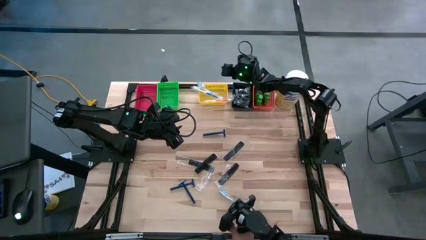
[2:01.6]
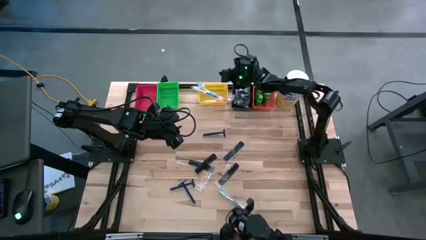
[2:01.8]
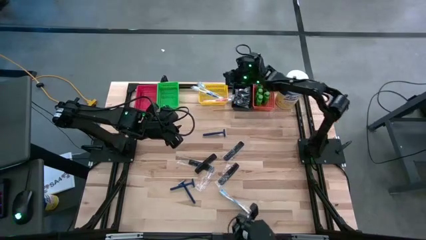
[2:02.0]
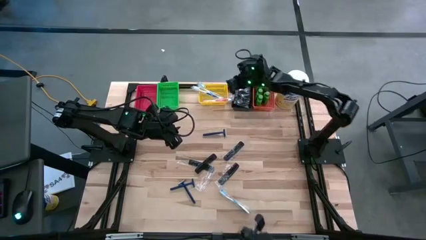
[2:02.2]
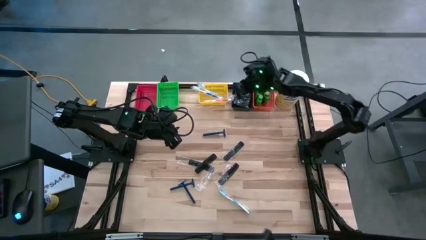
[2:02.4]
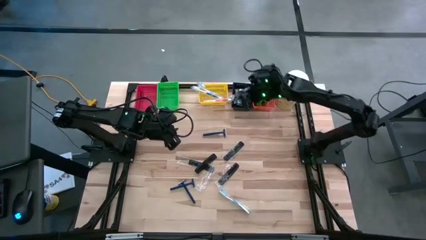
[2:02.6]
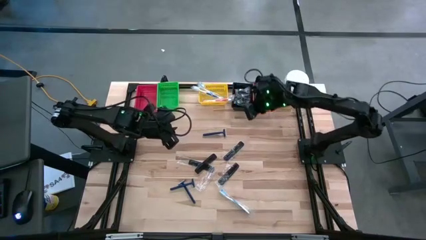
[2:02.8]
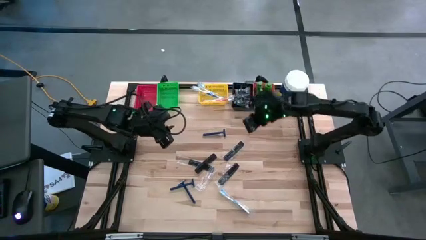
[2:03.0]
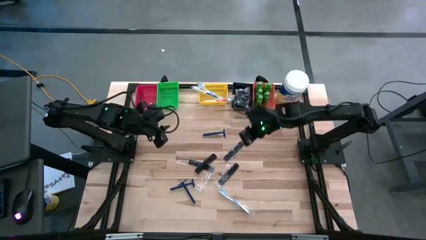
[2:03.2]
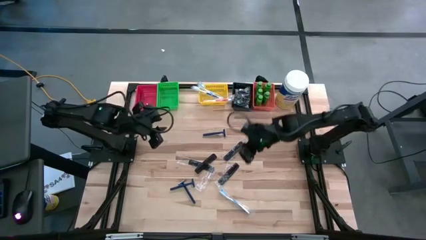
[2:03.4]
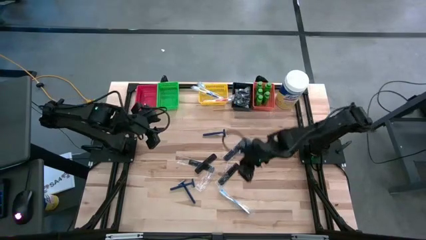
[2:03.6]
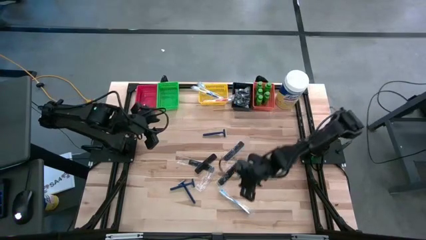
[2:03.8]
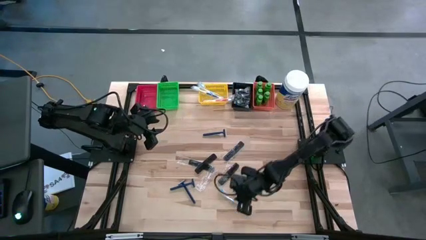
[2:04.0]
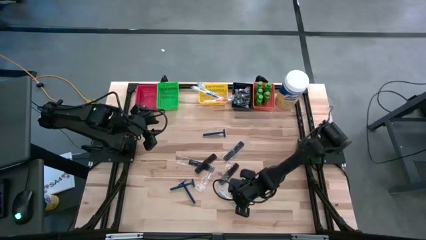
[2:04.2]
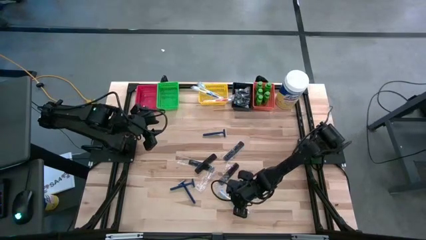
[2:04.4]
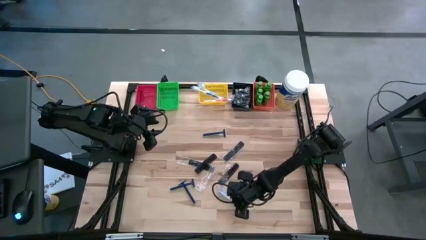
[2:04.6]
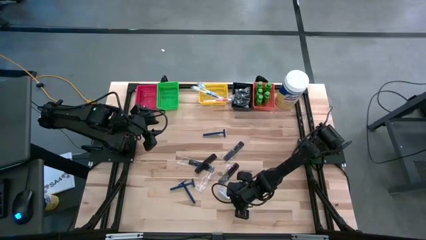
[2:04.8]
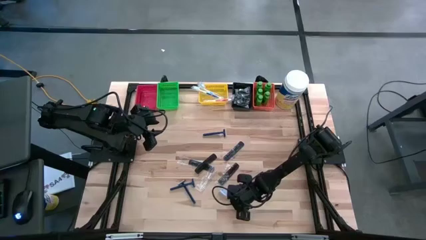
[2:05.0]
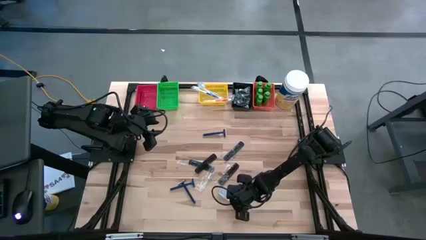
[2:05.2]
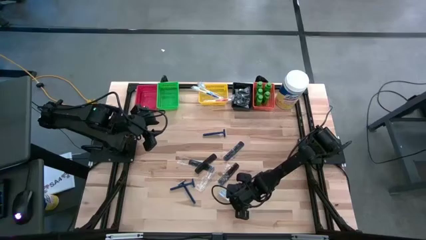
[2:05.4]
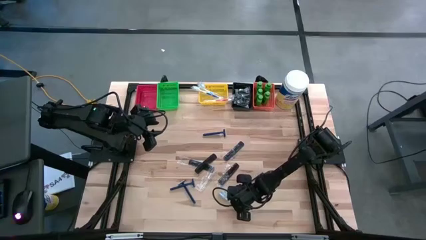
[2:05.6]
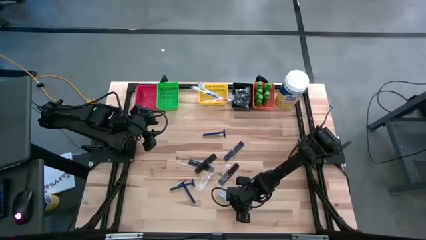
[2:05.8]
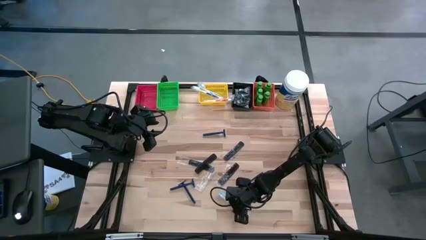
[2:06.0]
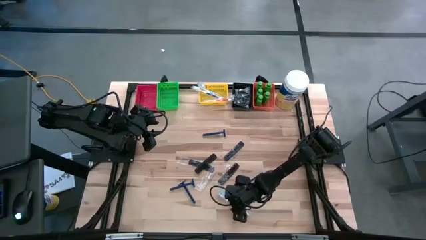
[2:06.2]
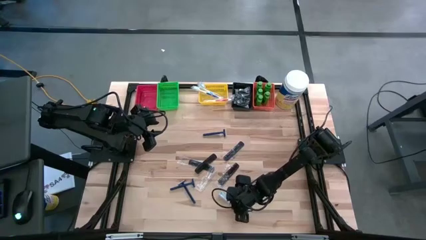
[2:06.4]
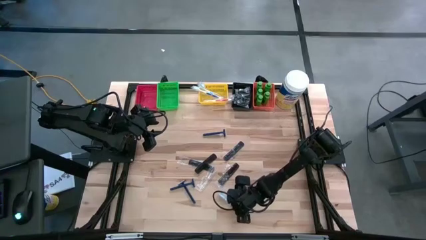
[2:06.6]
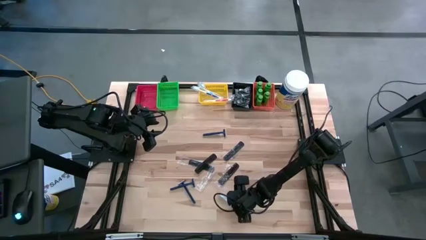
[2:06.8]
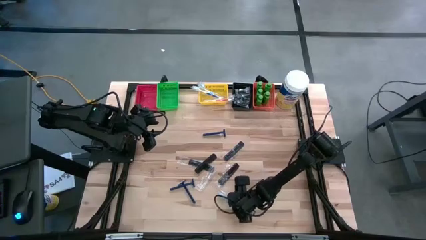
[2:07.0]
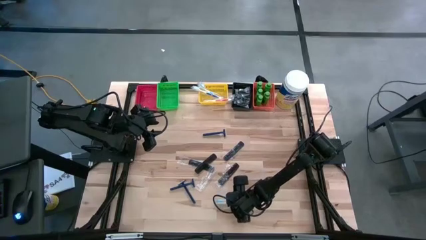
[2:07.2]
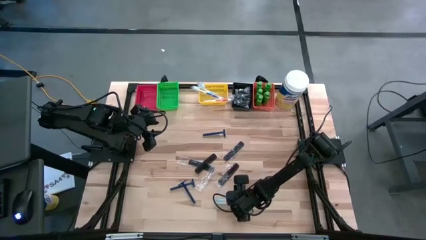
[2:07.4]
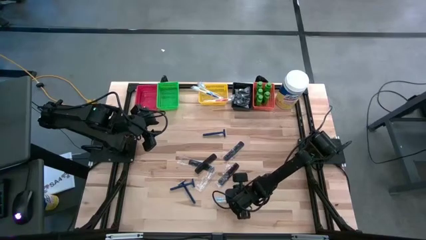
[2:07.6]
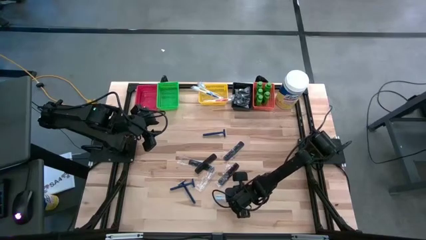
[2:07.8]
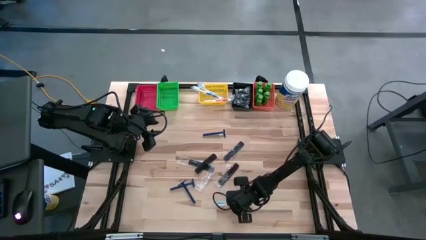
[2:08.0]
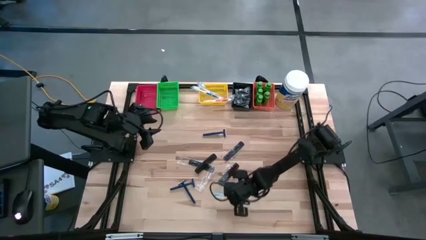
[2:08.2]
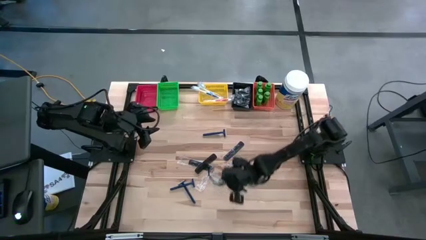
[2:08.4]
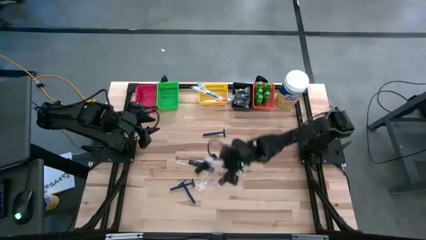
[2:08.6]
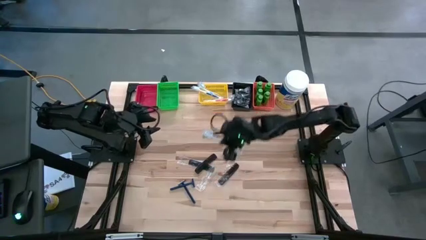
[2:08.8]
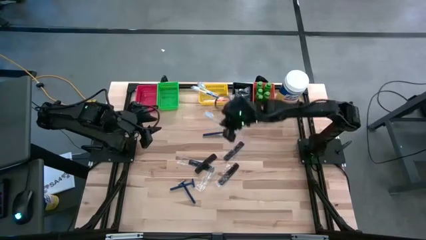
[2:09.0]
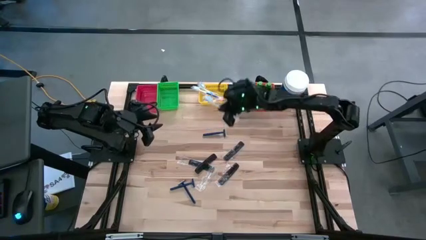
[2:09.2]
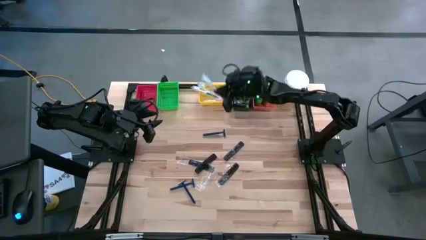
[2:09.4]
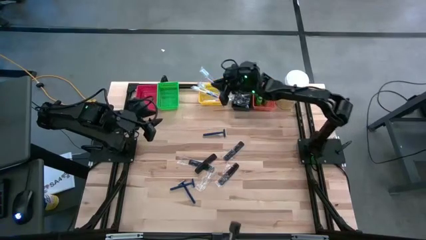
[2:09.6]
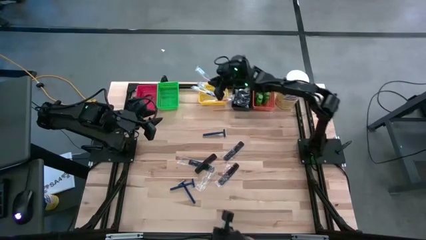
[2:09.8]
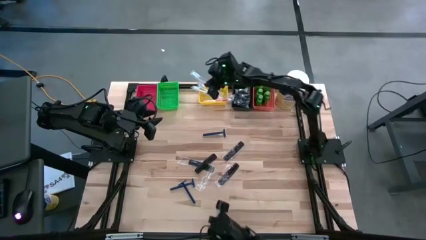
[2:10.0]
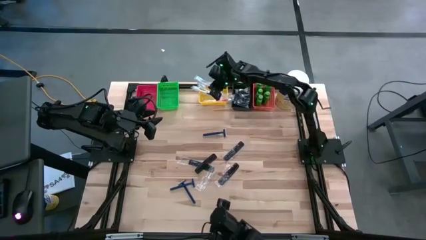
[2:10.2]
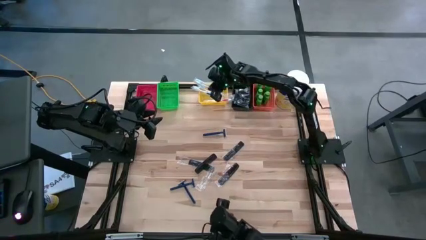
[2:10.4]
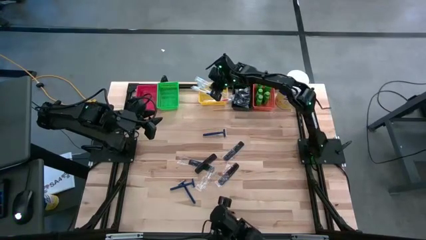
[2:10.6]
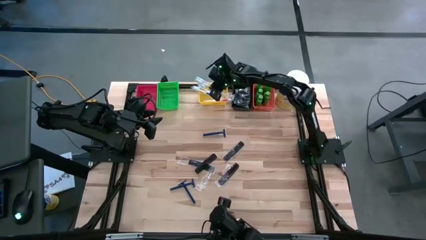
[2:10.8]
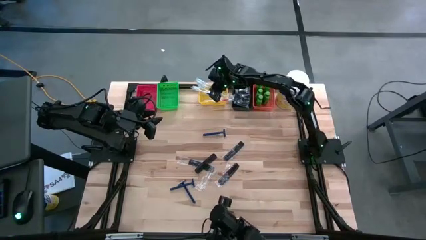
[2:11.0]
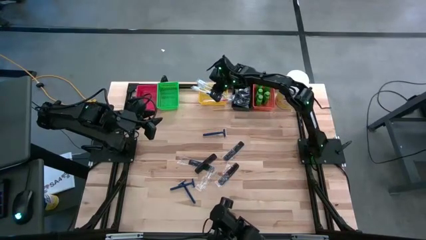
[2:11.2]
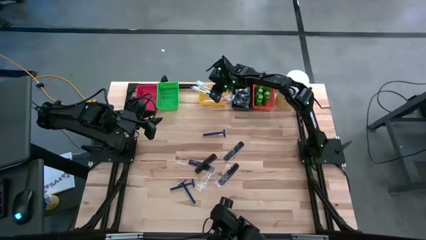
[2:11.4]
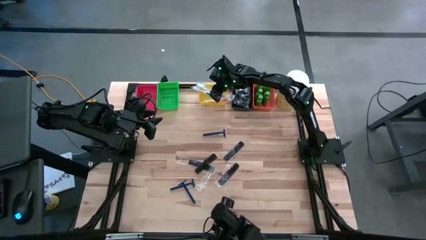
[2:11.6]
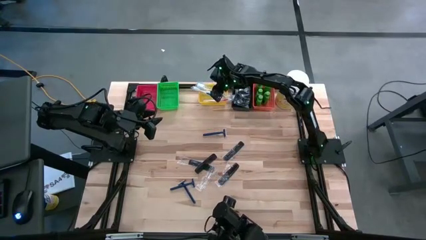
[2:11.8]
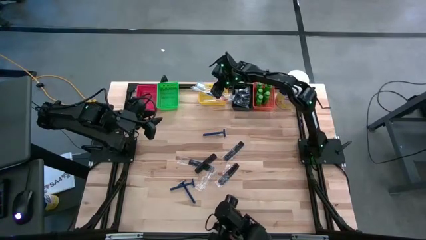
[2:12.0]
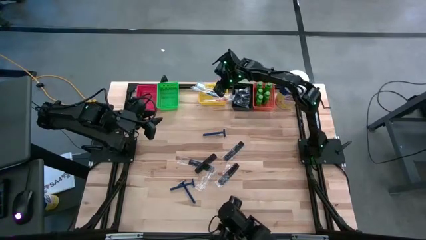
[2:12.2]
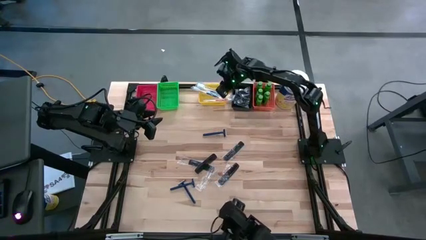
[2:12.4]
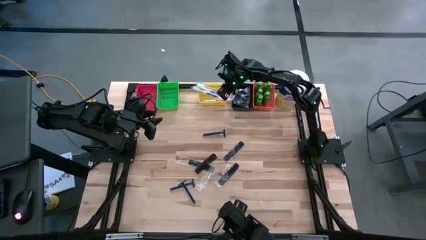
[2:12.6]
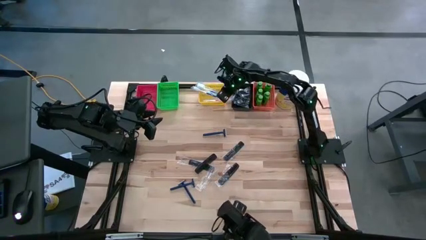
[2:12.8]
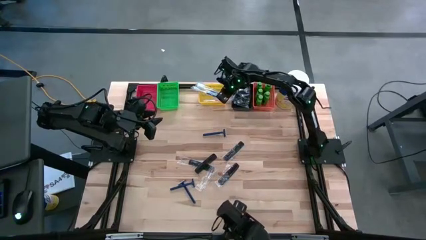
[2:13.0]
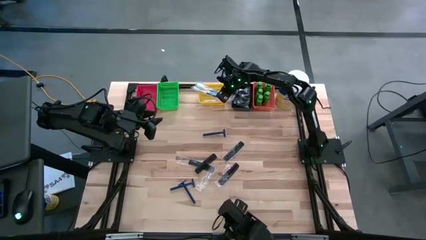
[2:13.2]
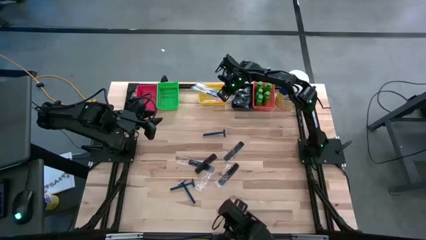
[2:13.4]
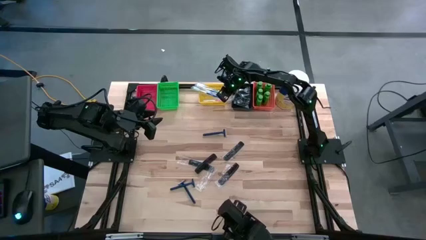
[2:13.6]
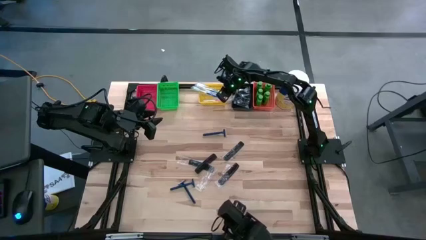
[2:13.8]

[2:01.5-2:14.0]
Task: Pick & Place Travel size toiletries
Put the light blue toothbrush into the yellow bin

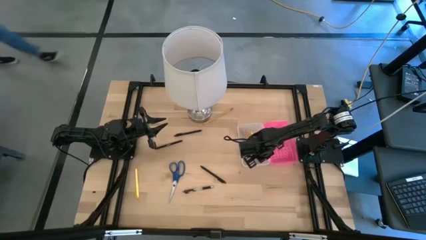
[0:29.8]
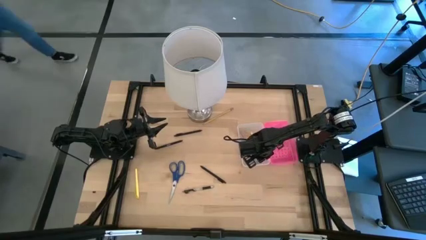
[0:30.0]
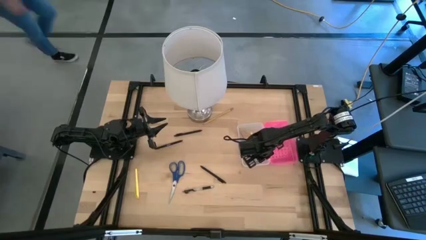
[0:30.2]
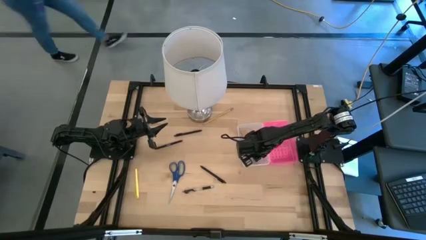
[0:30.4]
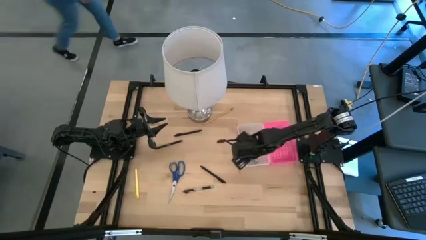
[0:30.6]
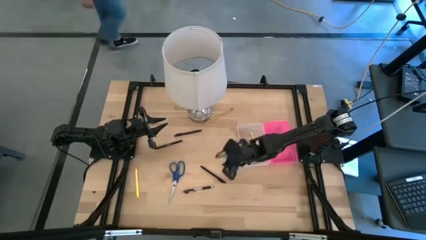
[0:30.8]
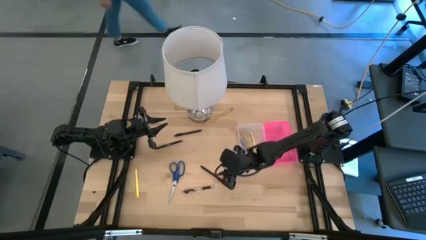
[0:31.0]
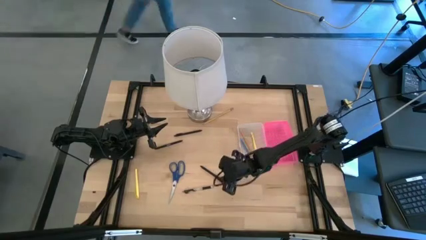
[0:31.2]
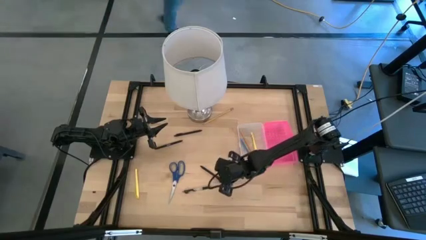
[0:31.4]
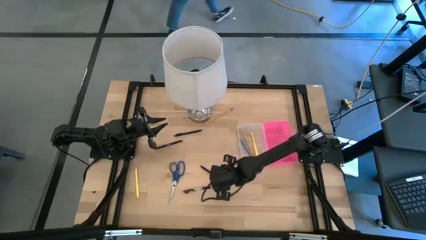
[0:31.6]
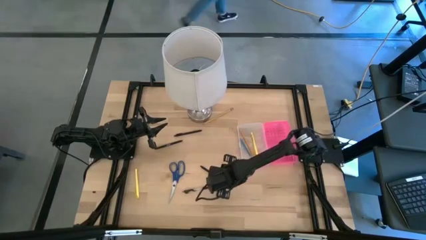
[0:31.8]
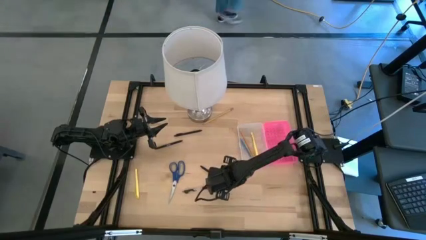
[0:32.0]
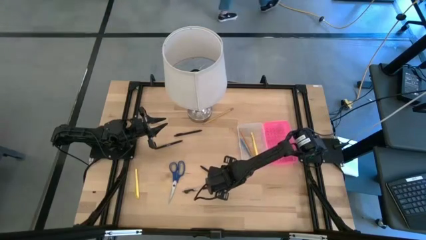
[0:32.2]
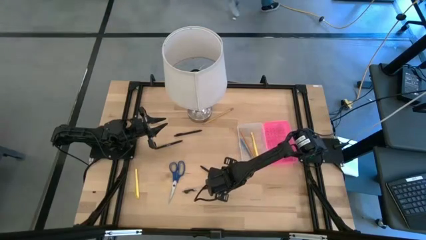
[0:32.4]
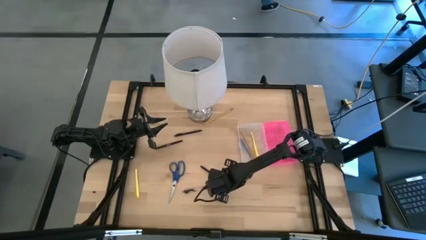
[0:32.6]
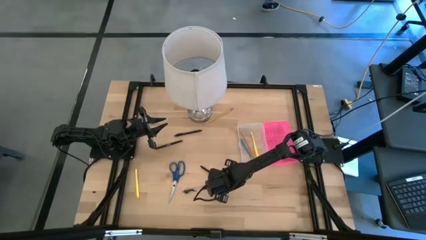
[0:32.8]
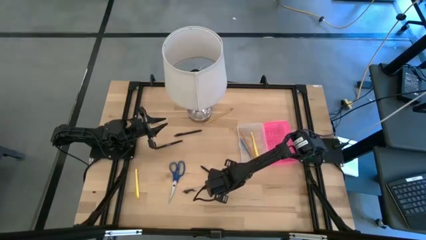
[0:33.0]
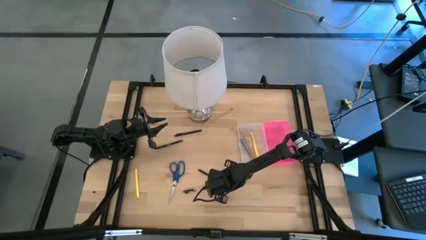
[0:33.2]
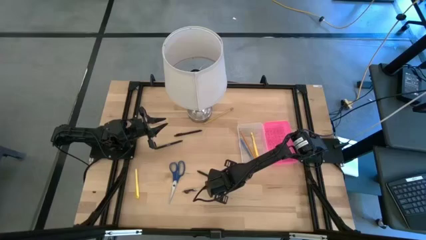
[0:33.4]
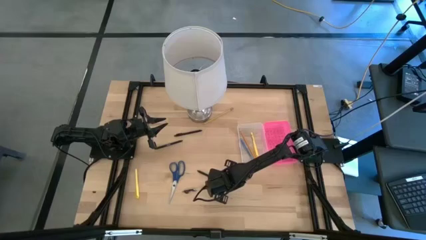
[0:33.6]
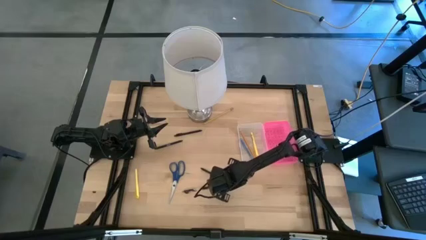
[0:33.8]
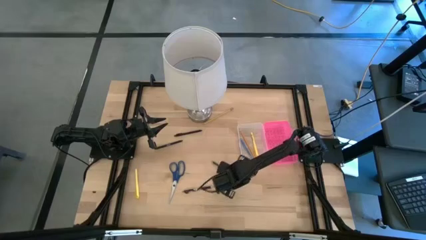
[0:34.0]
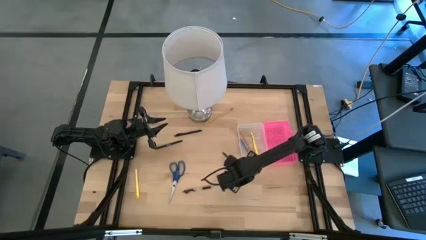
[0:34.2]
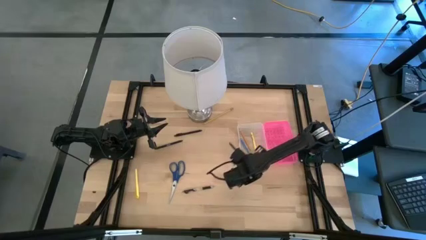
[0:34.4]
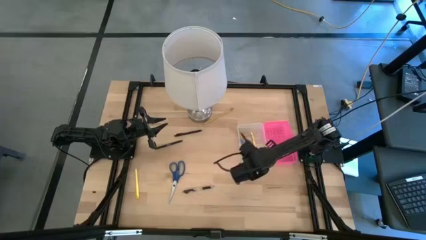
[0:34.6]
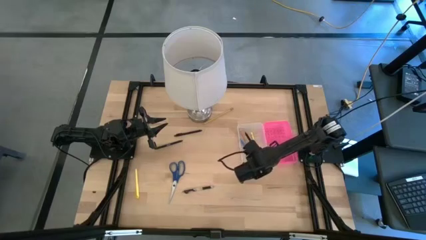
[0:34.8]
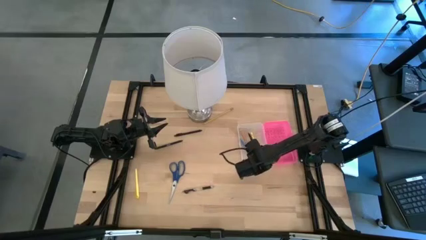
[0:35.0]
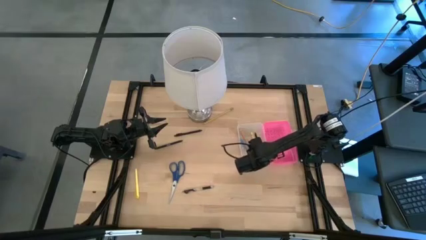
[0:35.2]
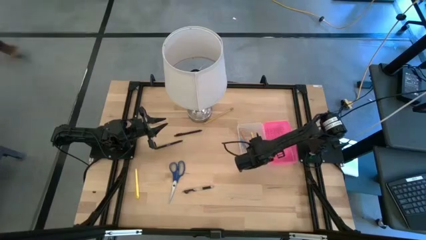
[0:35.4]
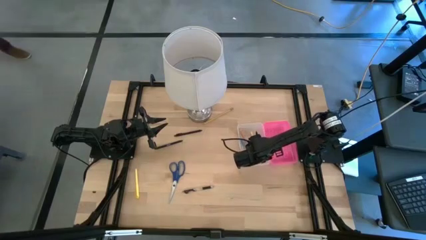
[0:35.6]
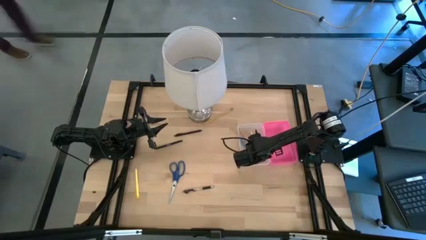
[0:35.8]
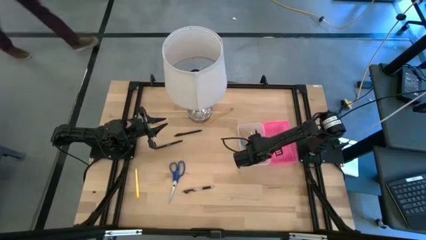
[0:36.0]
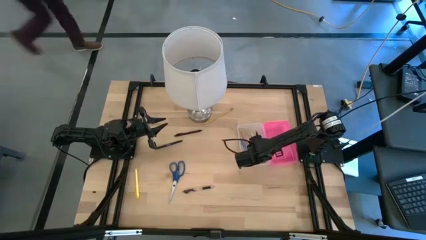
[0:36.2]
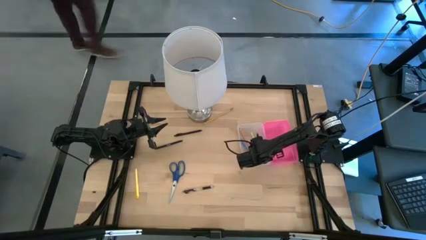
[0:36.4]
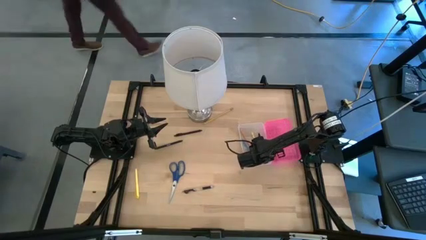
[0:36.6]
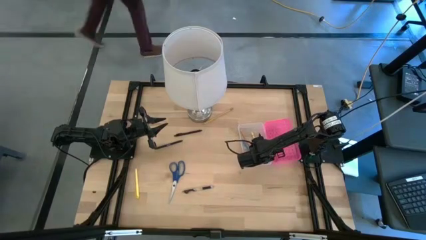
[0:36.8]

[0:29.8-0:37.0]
Task: Pick & place school supplies into a supply box
Put the bottom black pen into the supply box
